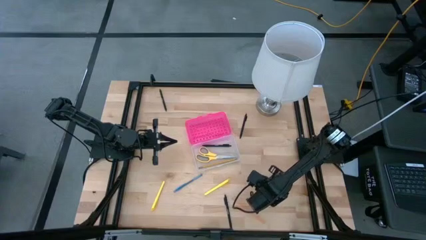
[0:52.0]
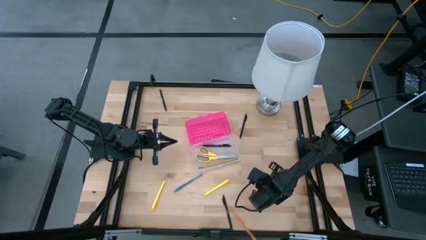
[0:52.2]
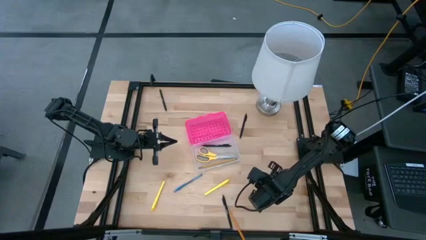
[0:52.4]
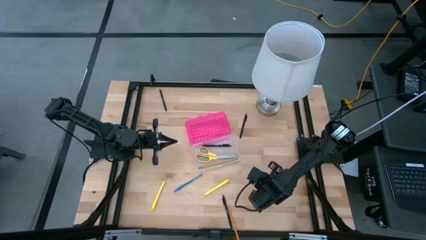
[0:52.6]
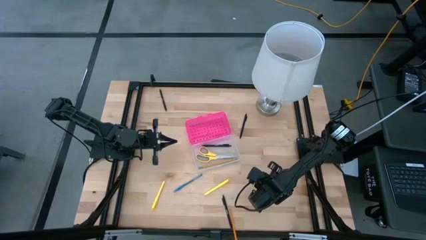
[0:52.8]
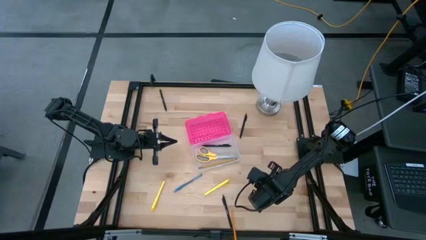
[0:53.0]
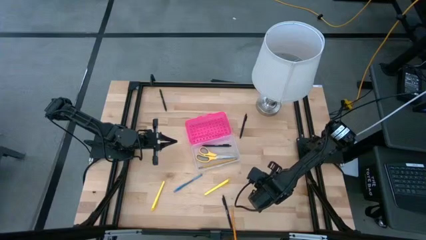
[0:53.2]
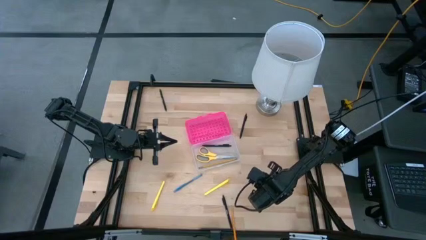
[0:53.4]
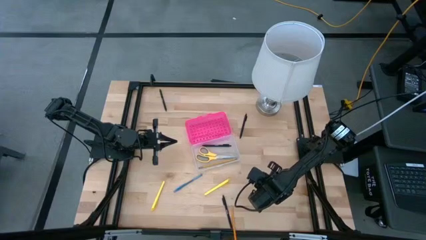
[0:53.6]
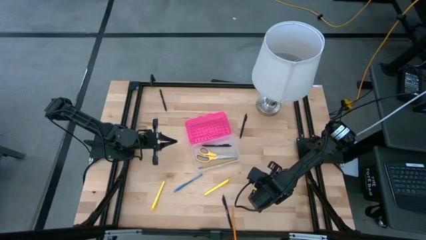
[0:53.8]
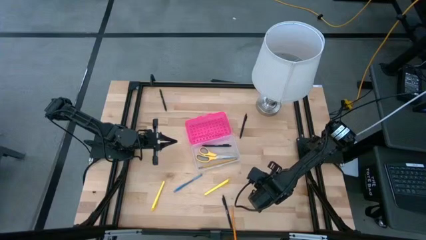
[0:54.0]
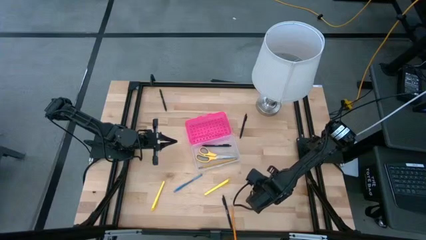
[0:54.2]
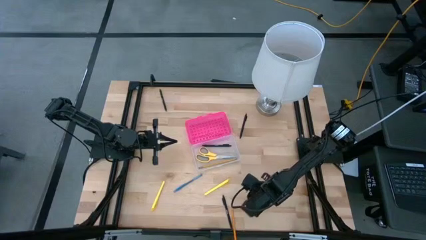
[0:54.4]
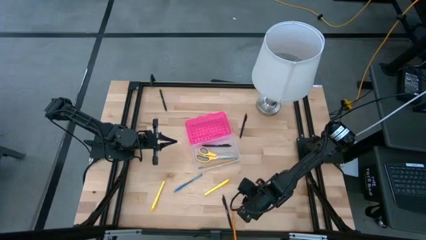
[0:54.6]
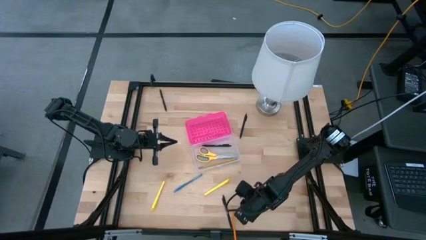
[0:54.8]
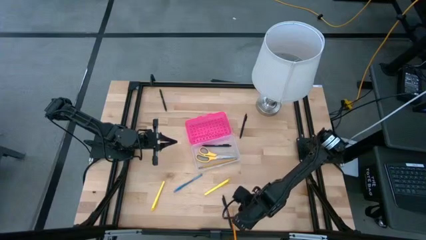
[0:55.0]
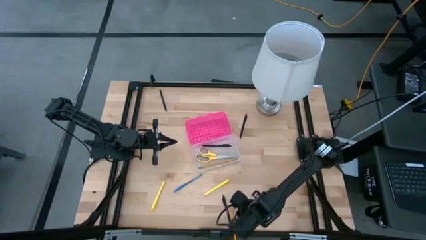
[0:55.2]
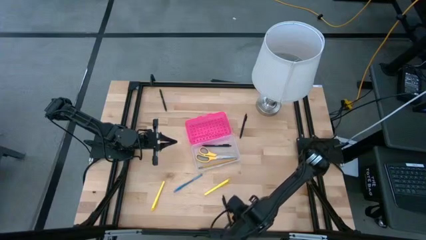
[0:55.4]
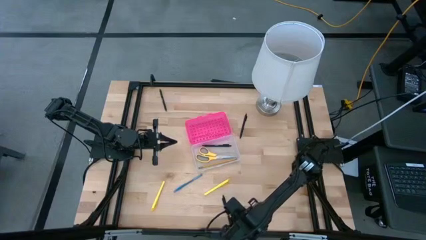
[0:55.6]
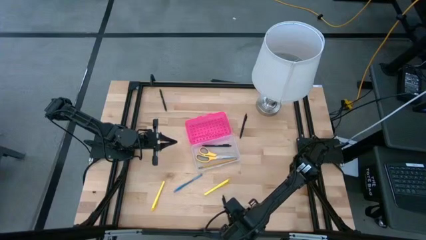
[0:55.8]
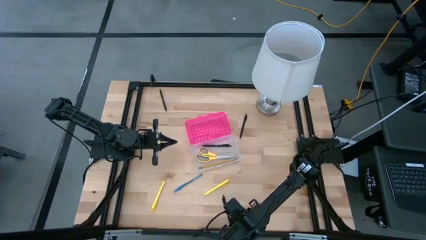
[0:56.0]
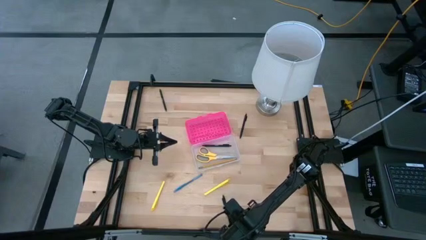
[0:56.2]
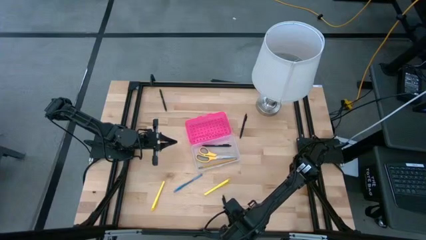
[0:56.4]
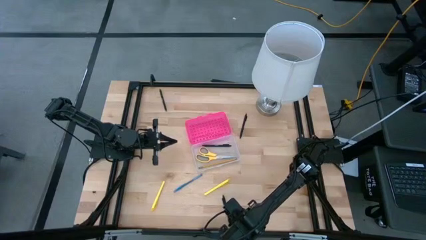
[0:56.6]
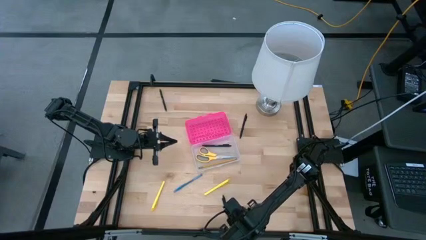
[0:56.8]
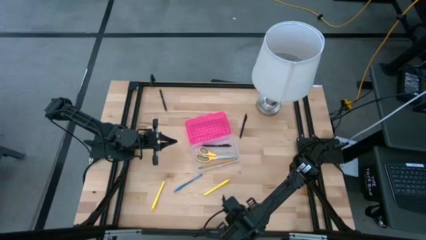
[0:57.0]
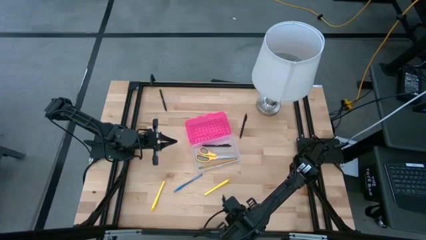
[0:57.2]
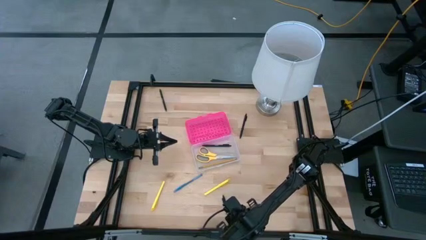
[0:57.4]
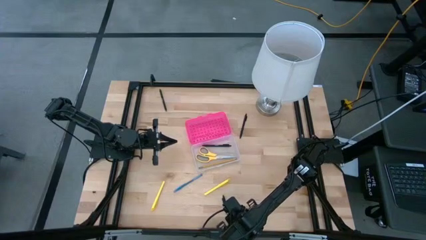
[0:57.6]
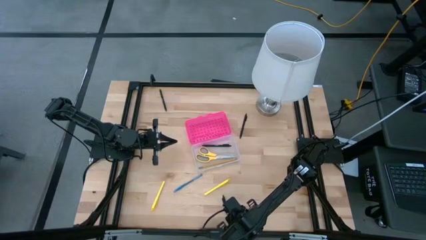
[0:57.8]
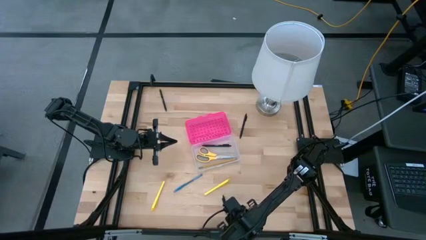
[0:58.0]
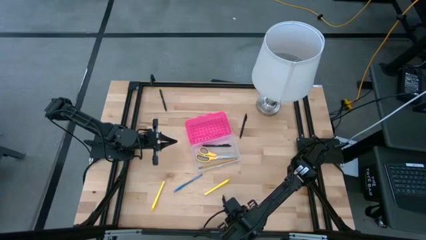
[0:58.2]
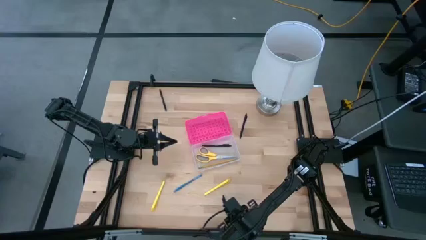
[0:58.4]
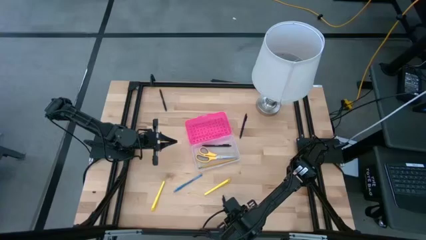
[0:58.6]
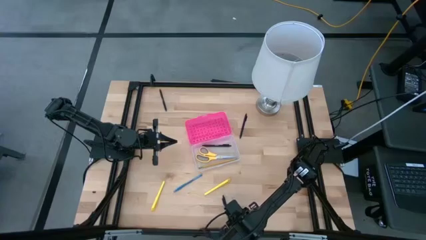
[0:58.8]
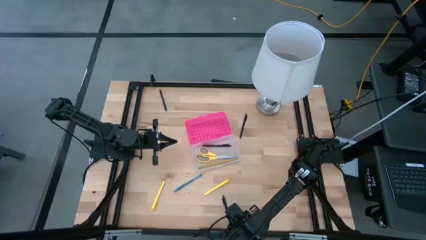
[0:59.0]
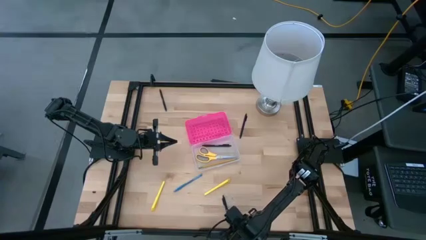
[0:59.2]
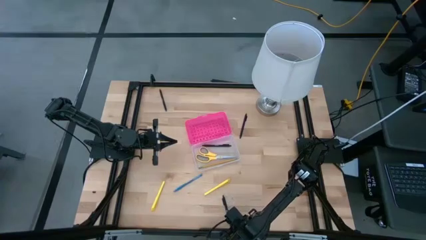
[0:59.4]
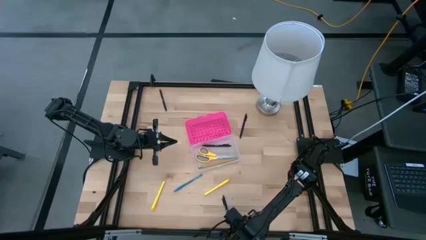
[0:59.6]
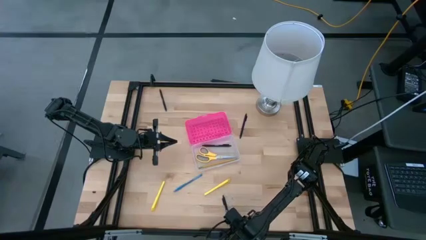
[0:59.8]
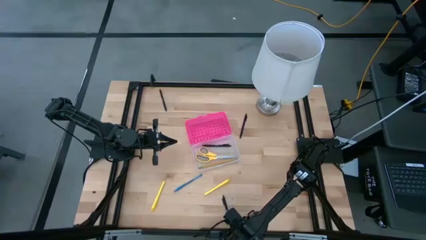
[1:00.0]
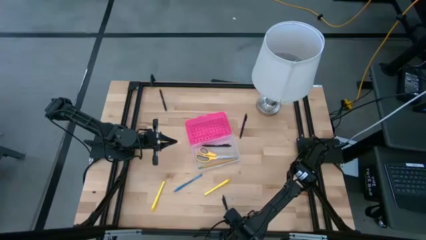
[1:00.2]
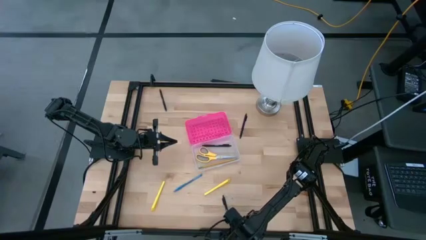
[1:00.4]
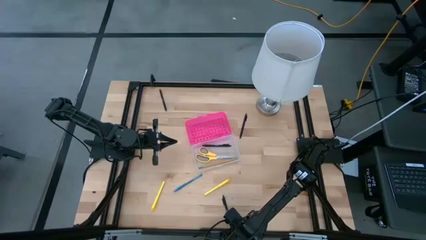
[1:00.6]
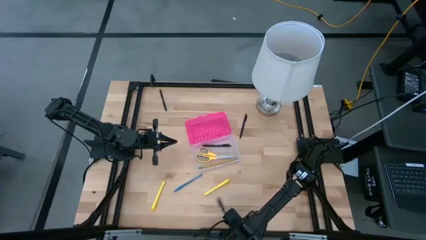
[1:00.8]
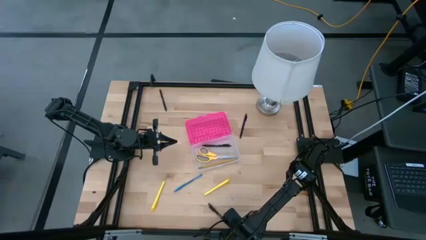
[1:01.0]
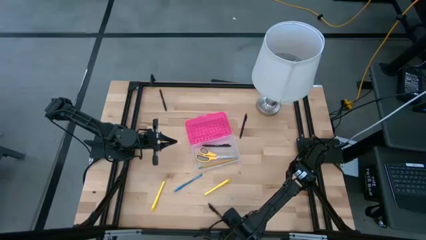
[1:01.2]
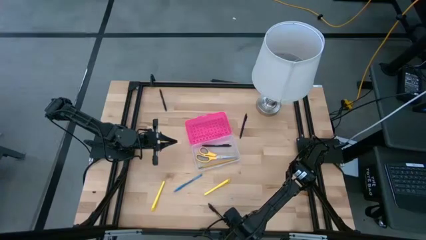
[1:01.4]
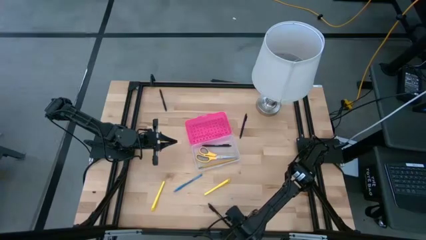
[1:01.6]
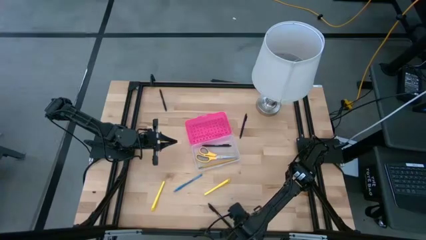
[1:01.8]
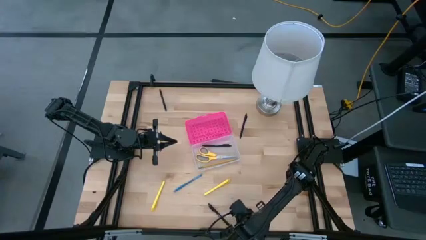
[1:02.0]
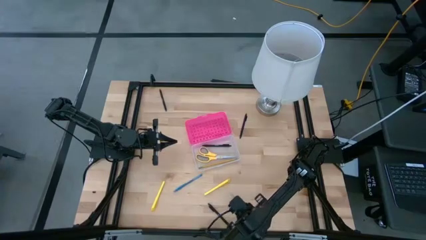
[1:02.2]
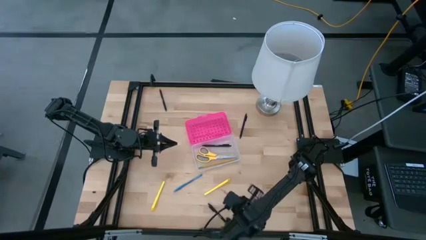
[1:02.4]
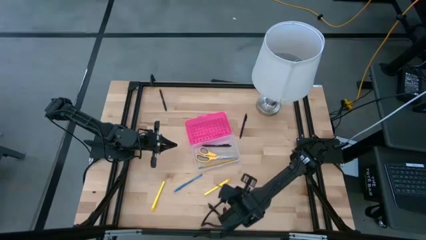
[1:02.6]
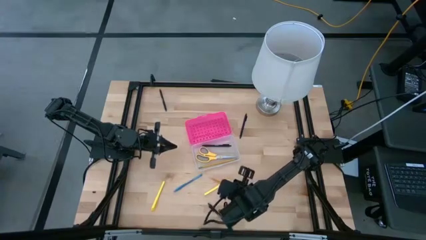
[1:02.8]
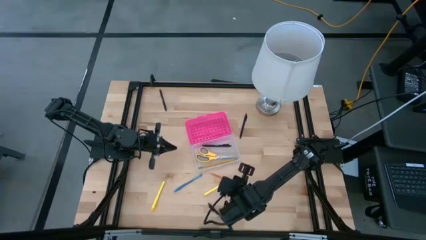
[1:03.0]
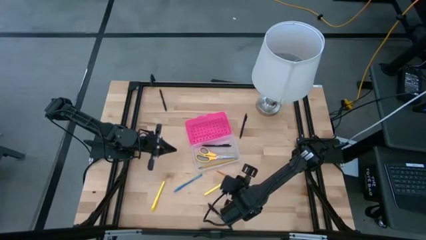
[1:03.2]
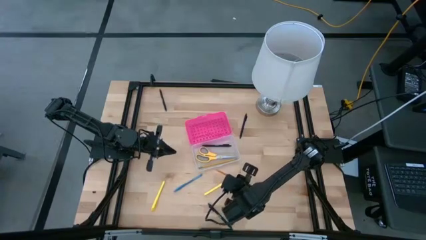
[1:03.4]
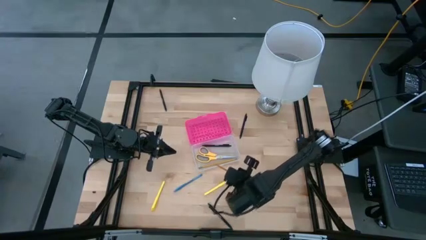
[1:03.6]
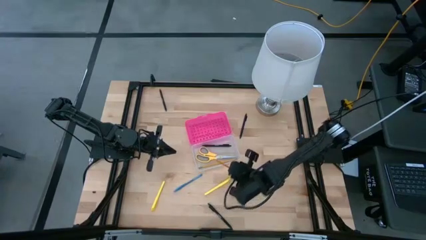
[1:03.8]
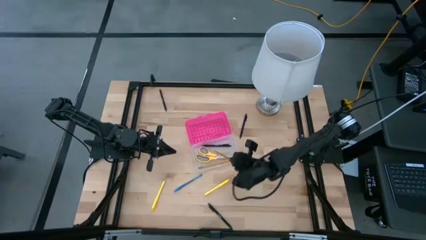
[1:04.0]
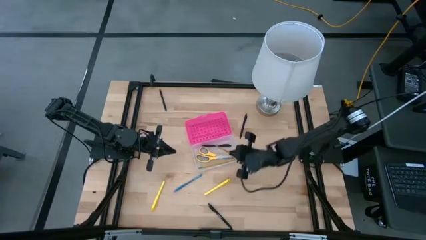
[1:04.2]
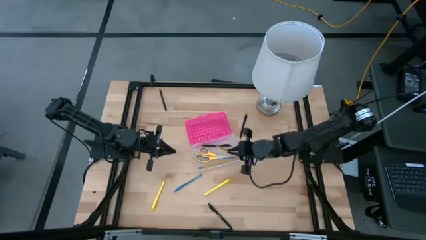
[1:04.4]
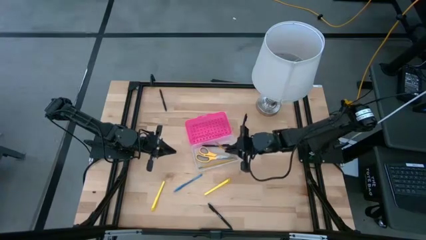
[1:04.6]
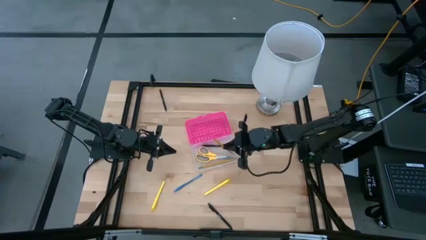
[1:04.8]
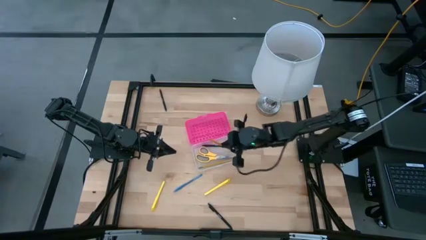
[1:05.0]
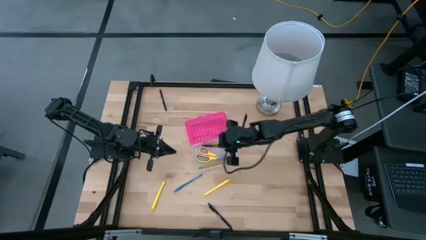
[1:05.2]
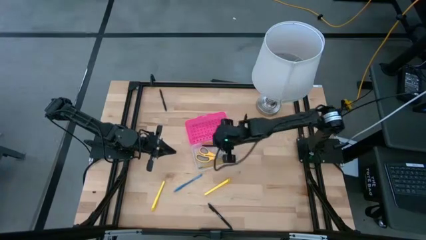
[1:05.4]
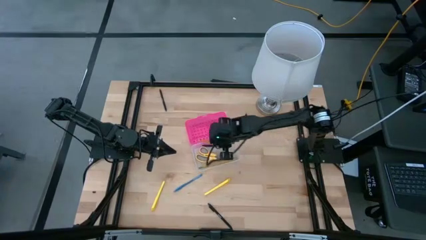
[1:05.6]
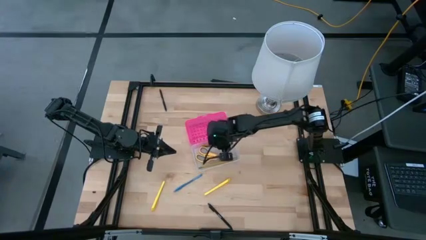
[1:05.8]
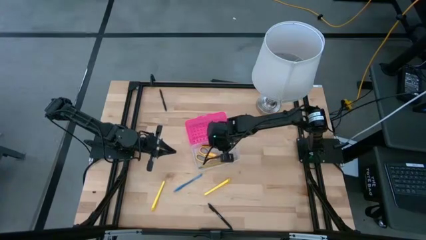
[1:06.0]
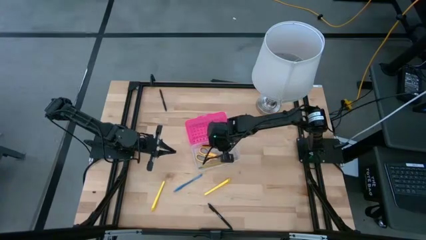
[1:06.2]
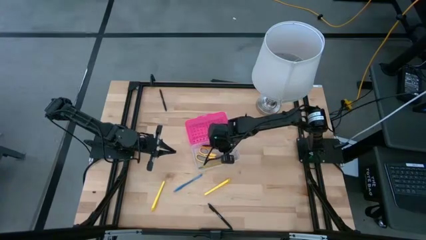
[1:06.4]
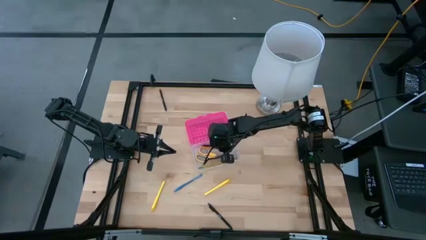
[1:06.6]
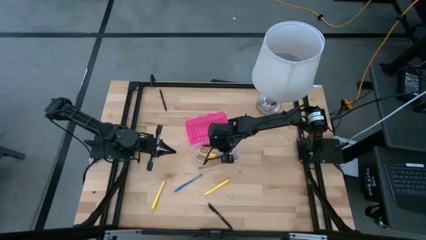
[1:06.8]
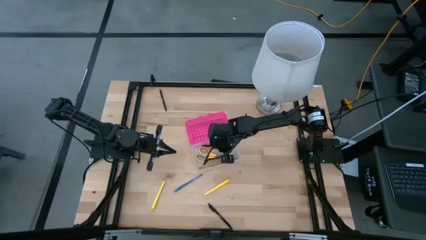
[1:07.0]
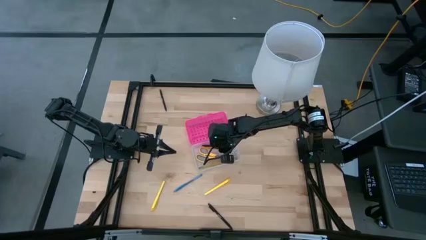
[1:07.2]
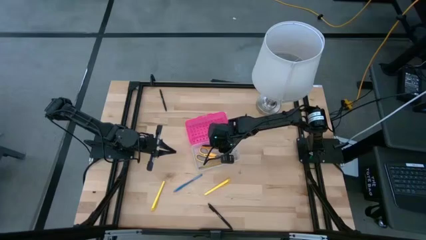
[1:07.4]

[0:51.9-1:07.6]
Task: Pick & place school supplies into a supply box
Put the orange pencil into the pink supply box
